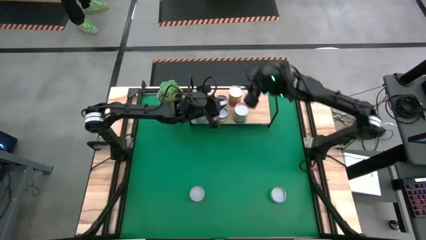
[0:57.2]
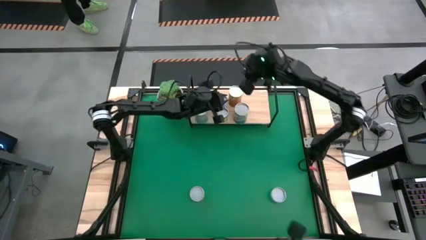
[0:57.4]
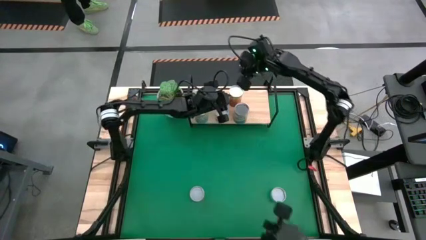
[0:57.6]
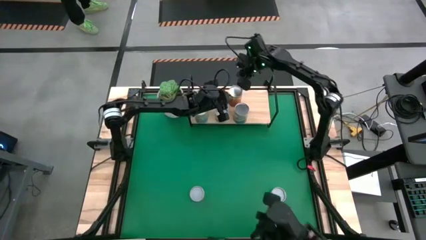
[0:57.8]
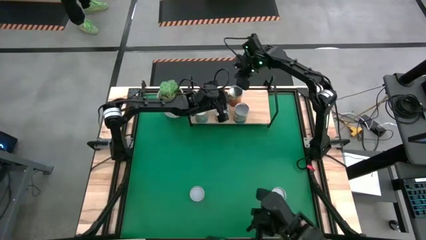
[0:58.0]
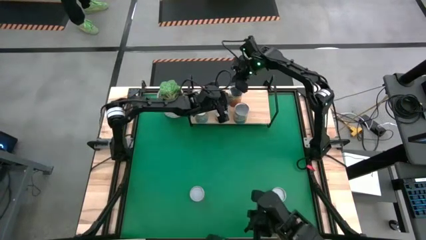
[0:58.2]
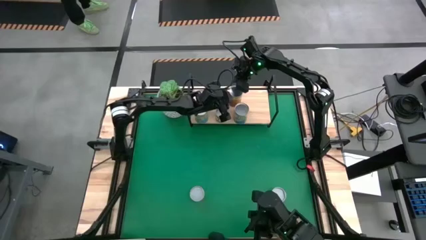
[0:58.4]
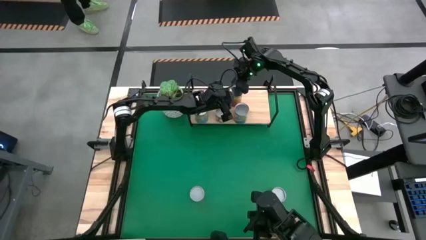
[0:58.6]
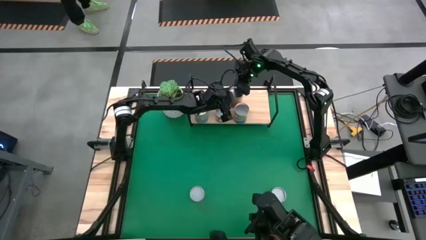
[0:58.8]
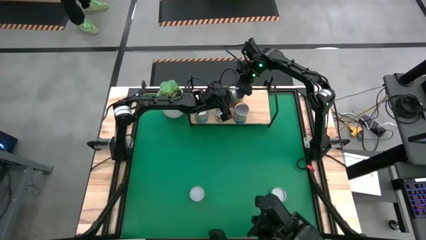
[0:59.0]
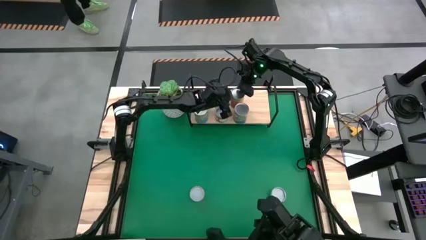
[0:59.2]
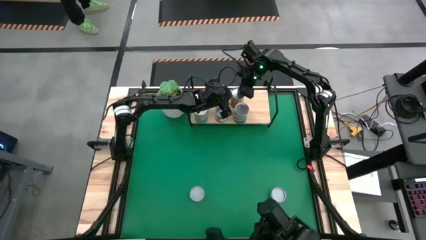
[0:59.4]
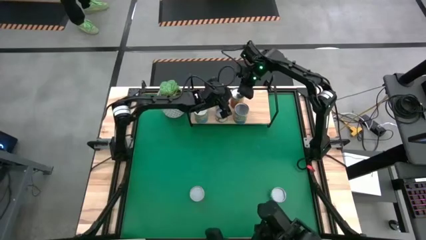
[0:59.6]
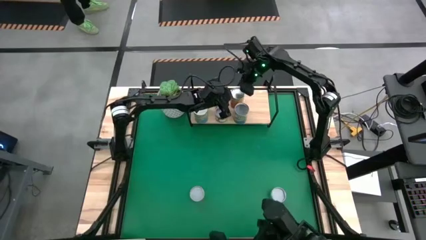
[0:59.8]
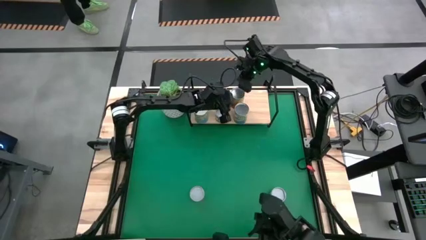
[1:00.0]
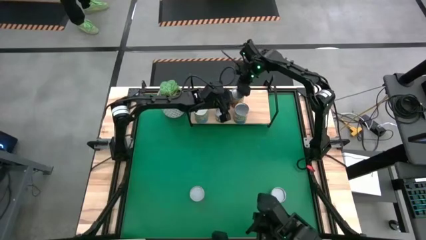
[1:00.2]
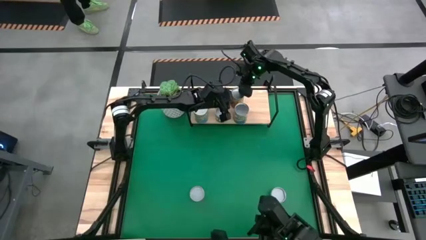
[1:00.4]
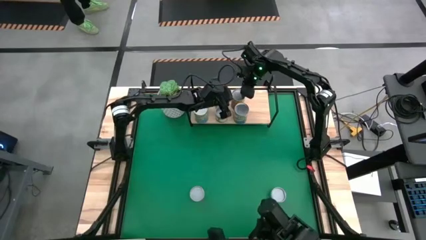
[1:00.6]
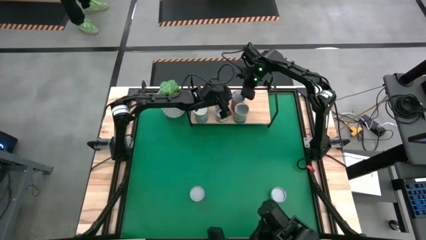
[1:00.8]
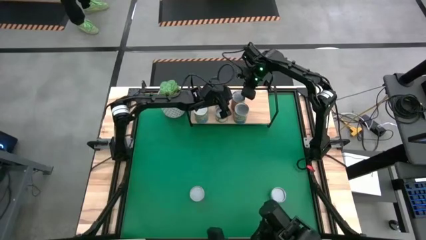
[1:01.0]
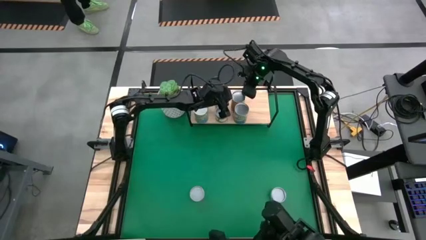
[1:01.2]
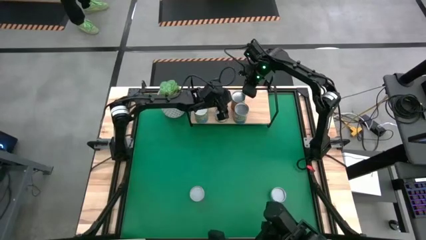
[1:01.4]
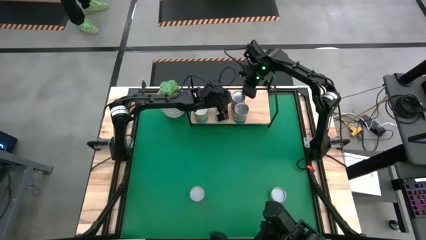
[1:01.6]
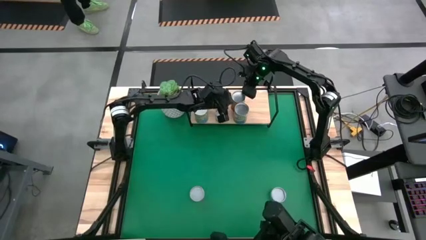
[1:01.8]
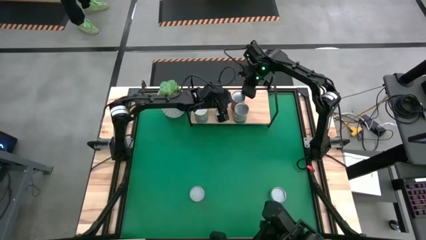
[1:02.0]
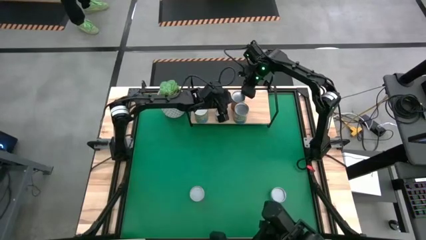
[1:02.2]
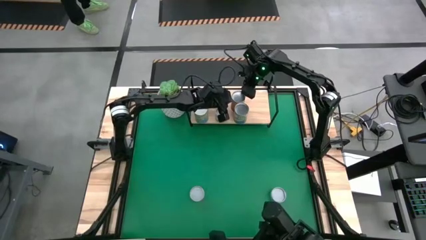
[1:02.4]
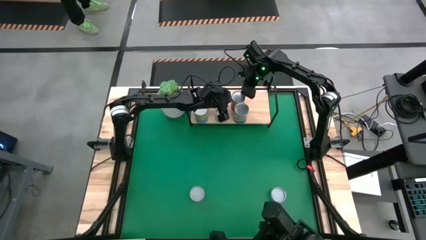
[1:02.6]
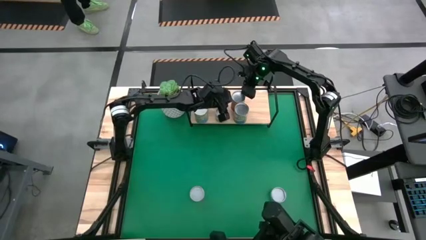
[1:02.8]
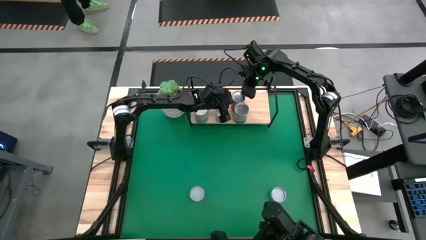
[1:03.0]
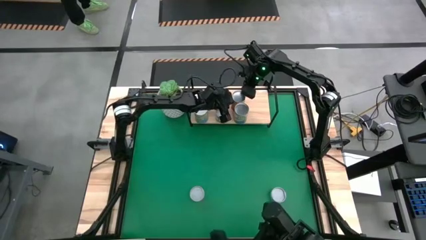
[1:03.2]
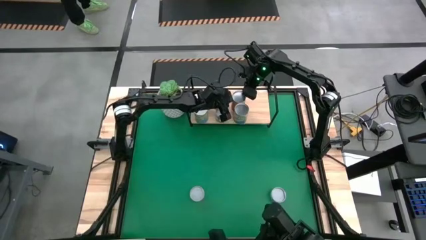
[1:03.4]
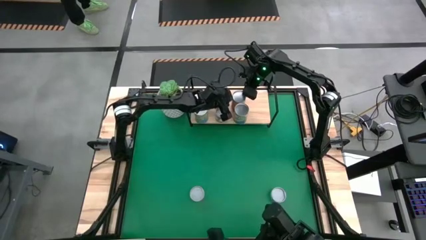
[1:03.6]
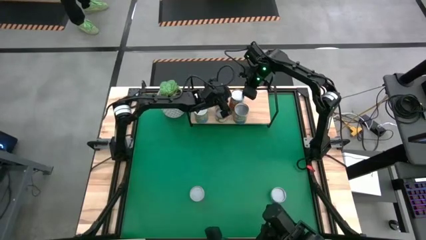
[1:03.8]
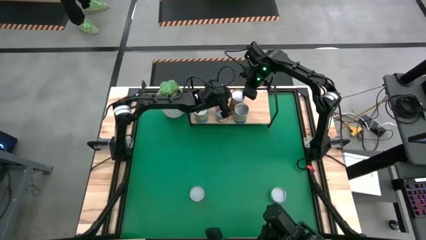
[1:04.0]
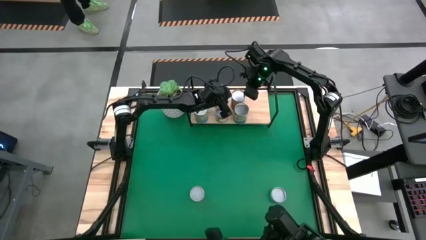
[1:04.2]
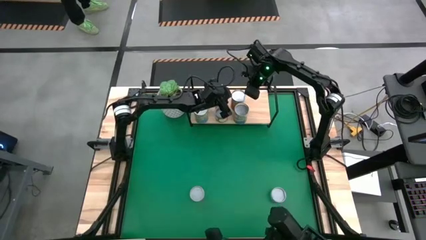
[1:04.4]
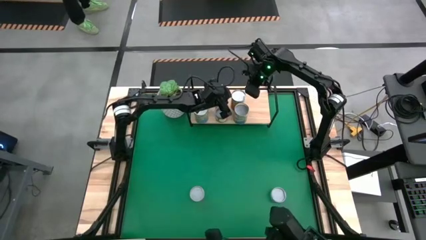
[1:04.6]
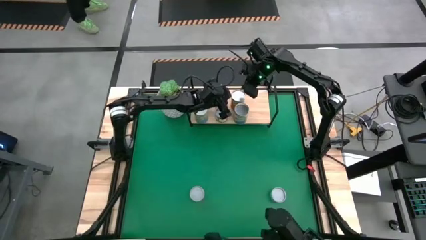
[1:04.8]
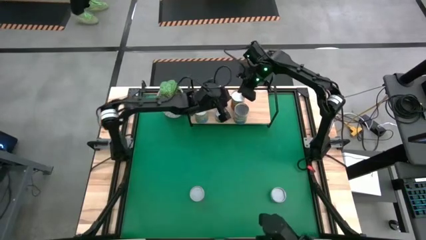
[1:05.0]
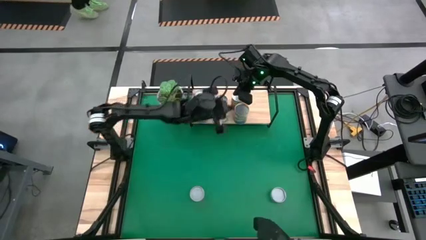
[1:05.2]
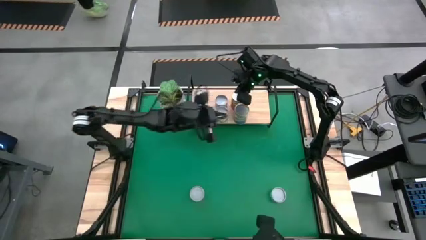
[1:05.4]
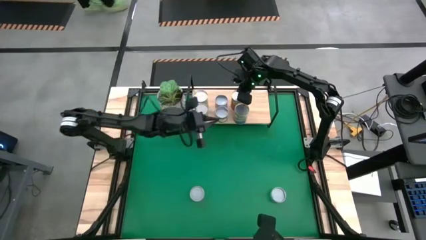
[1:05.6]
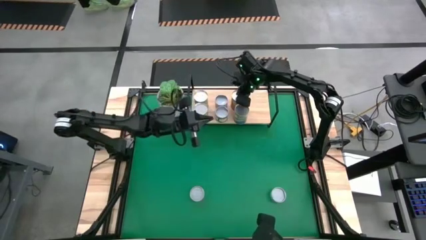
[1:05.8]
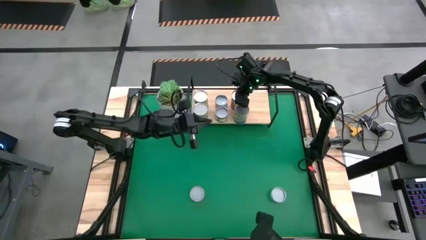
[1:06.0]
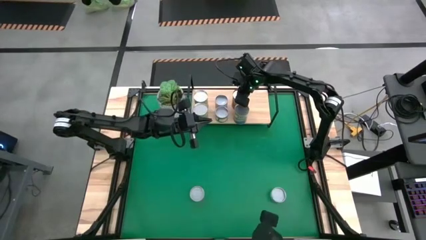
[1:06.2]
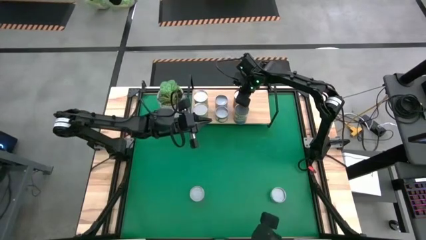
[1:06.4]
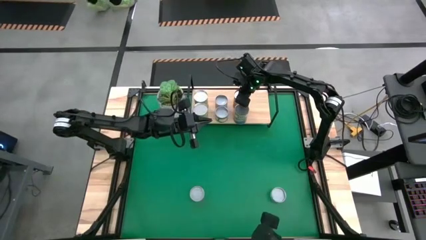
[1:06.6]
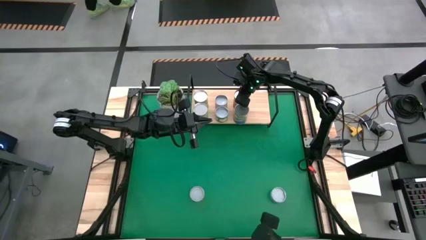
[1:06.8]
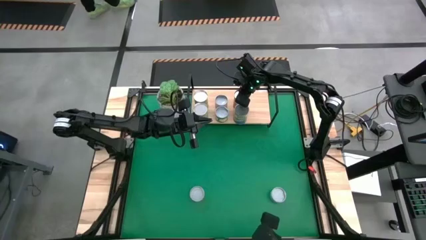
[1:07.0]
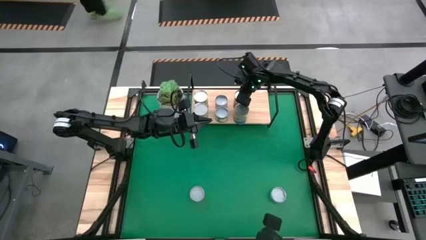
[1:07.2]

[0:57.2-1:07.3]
Task: Pick and place cans onto a shelf
Put the canned pineapple on the shelf

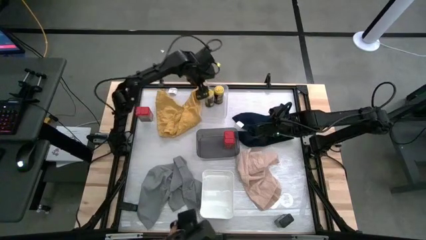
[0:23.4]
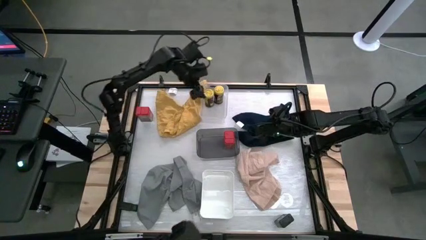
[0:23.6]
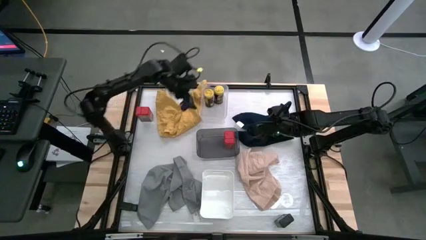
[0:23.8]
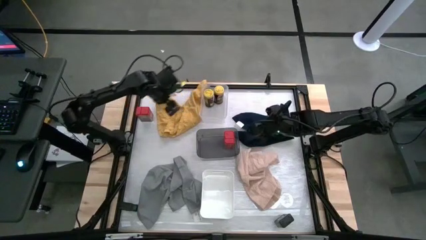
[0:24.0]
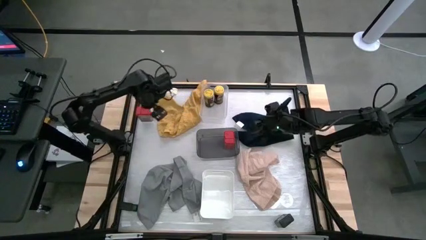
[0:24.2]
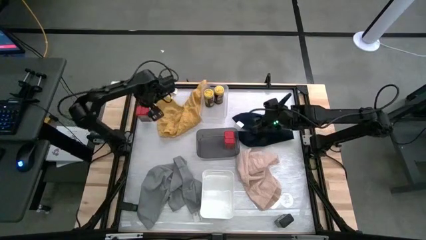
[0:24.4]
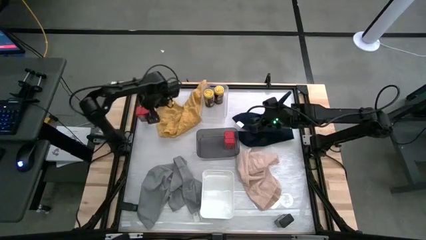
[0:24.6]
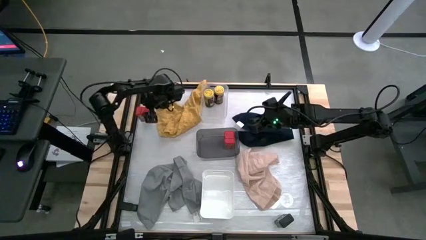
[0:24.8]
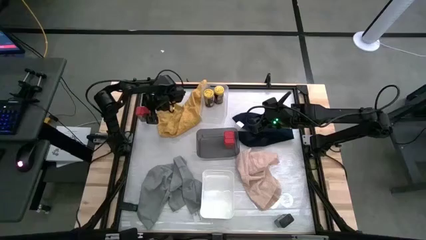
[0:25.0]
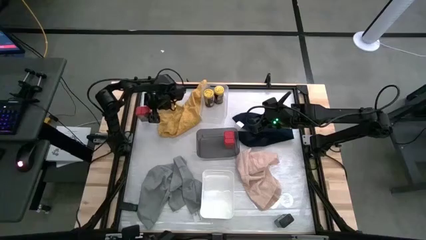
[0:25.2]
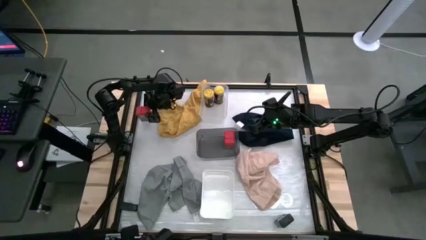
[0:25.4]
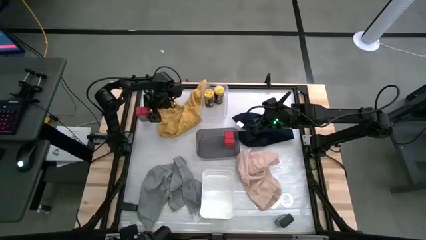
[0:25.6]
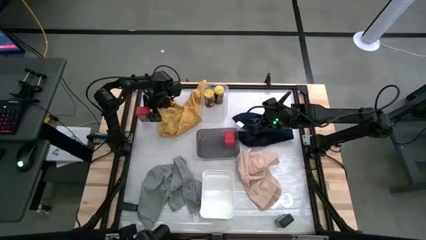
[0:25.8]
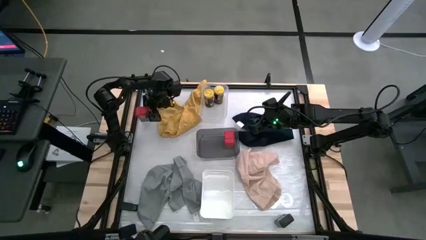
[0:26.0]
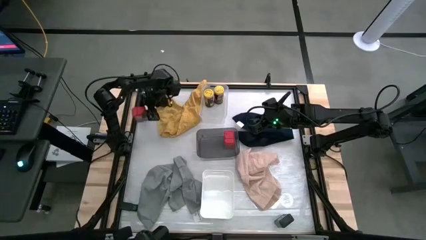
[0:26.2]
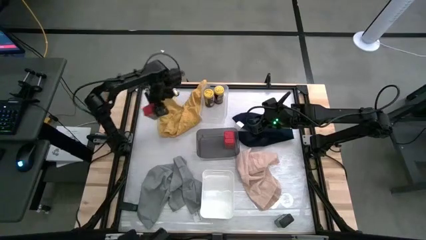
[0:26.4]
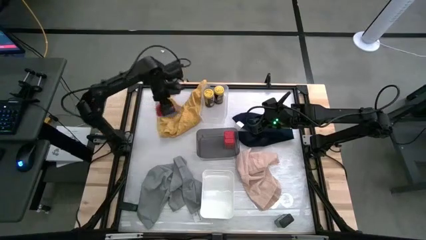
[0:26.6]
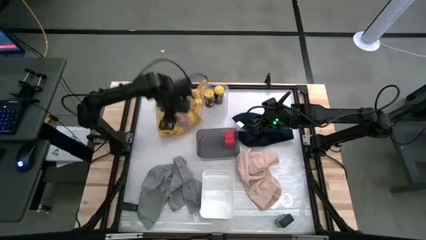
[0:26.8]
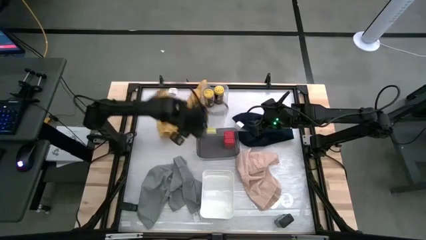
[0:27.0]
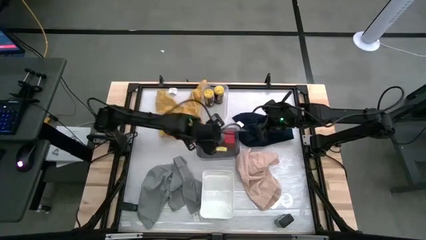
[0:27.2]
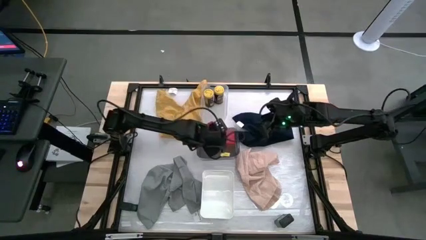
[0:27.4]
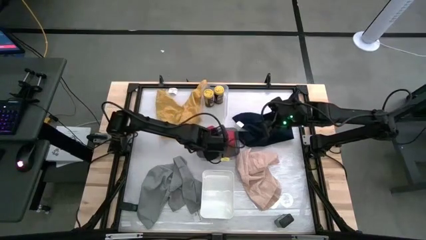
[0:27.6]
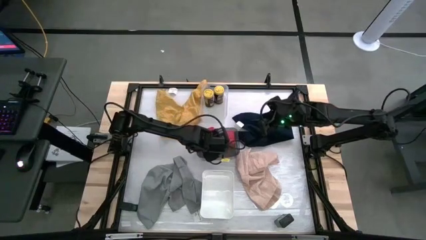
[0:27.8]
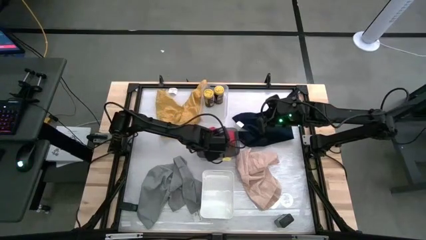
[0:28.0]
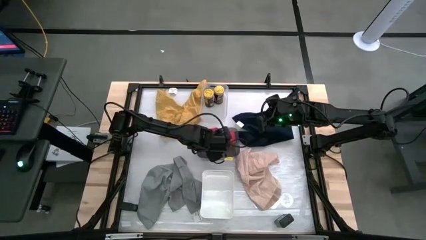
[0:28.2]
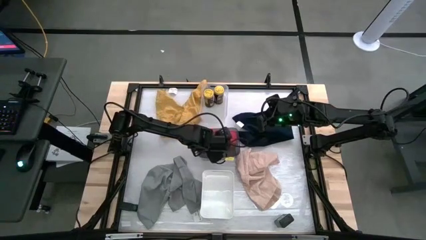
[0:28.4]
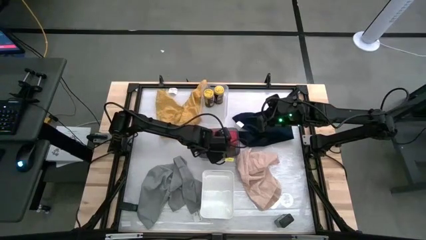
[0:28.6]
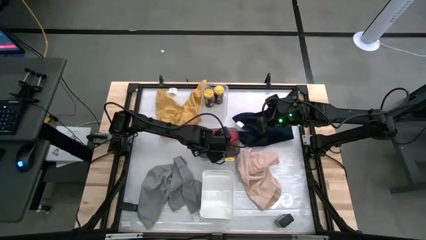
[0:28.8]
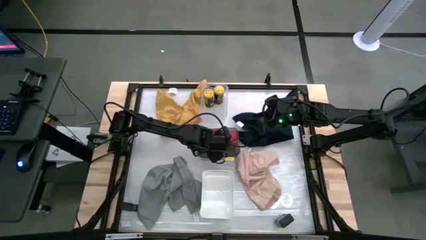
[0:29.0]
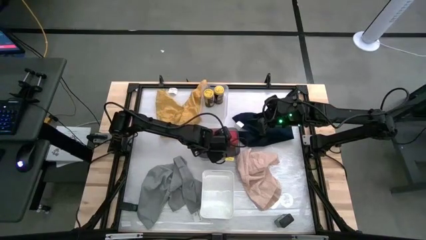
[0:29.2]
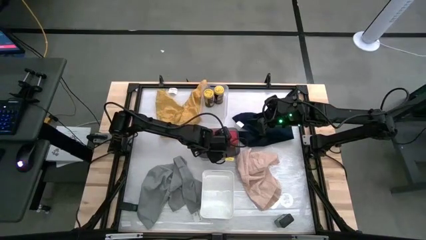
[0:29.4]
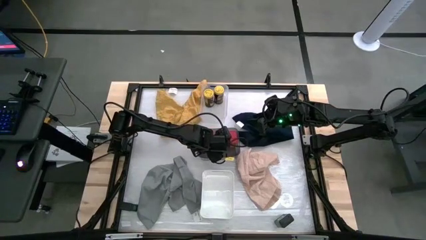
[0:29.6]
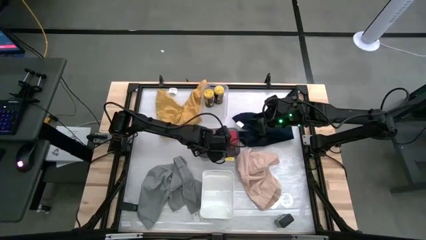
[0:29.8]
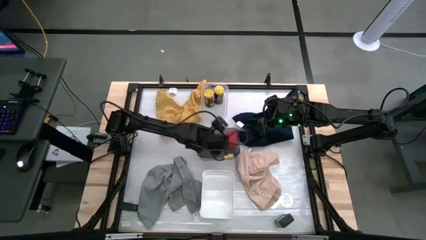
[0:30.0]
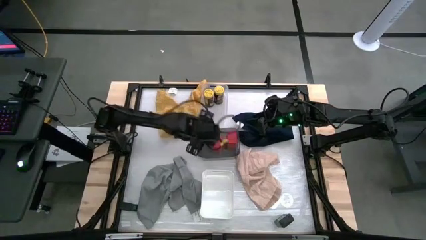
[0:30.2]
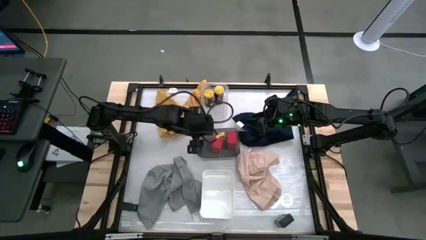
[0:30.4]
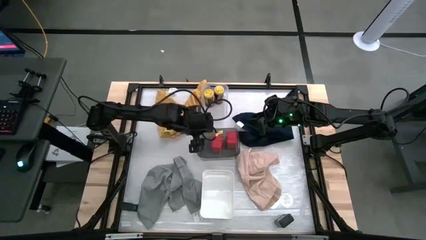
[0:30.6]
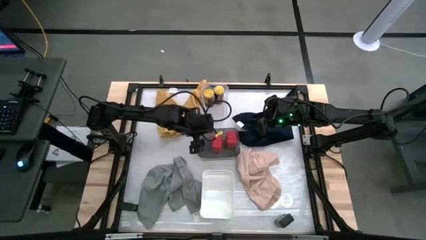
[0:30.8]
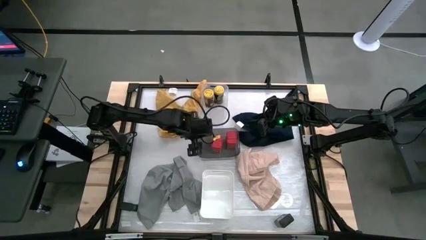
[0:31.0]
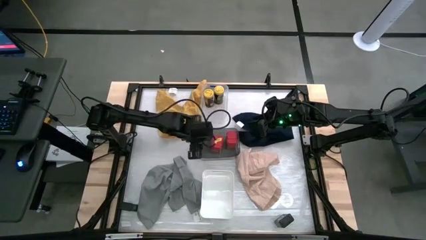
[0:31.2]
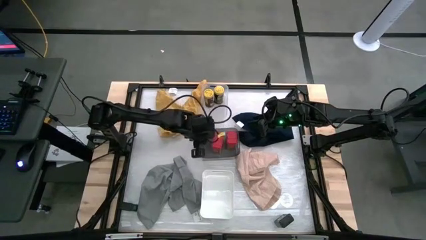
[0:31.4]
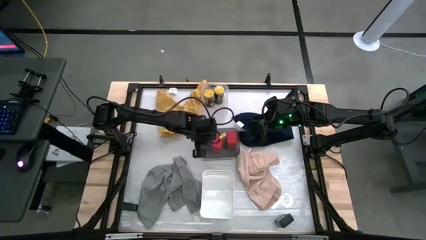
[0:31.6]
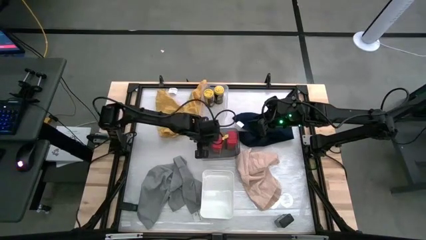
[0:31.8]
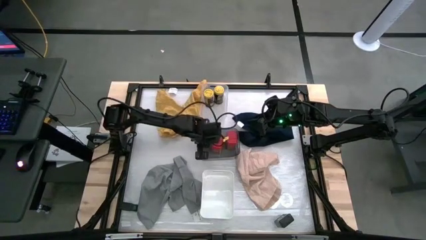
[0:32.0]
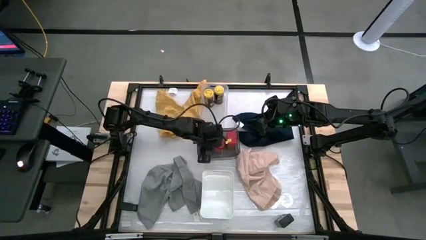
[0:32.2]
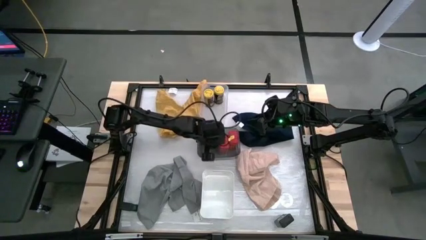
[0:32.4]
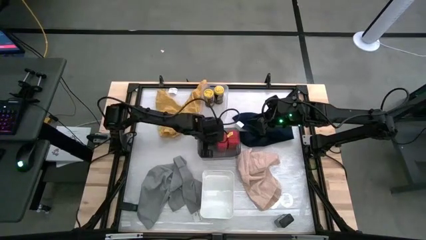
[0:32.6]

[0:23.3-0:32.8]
Task: Sort spices by type
Put the red spice can into the black bin
